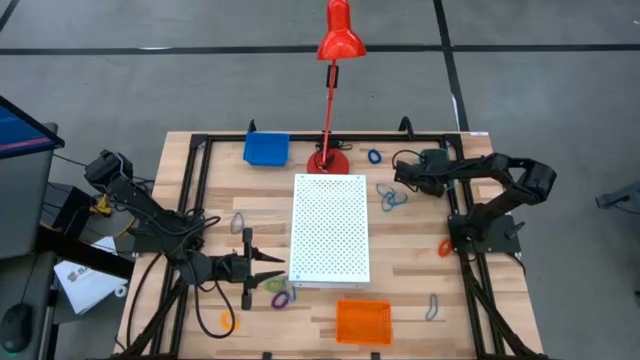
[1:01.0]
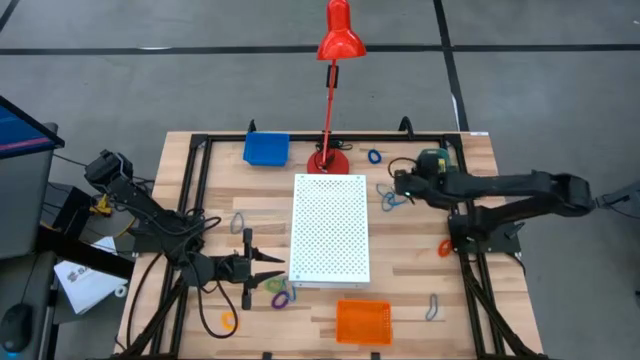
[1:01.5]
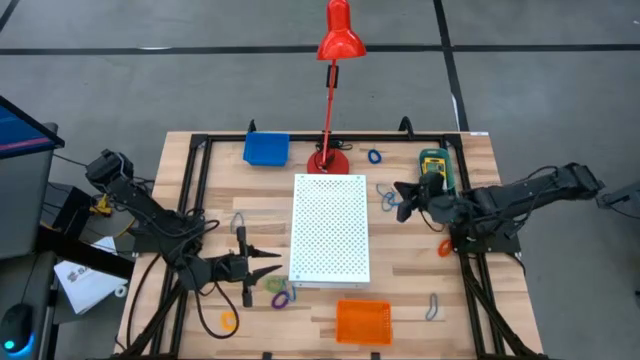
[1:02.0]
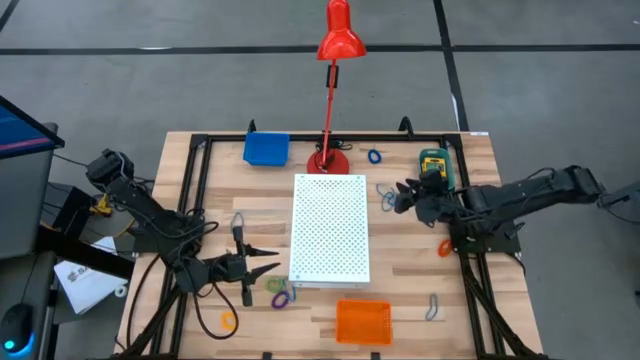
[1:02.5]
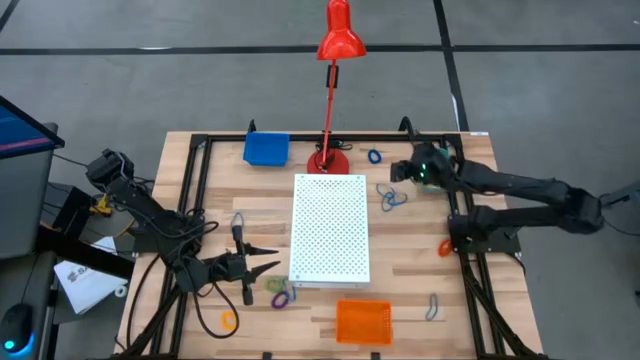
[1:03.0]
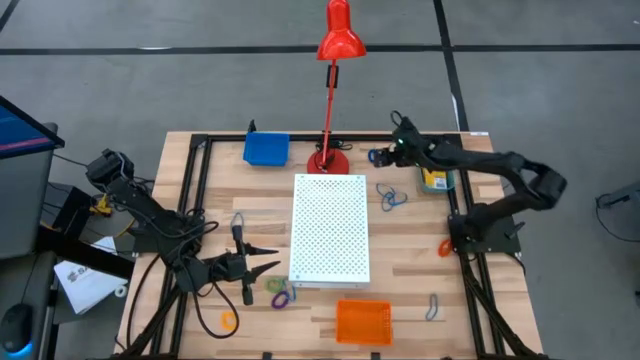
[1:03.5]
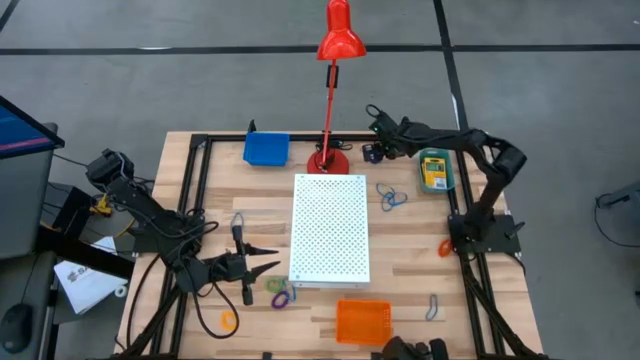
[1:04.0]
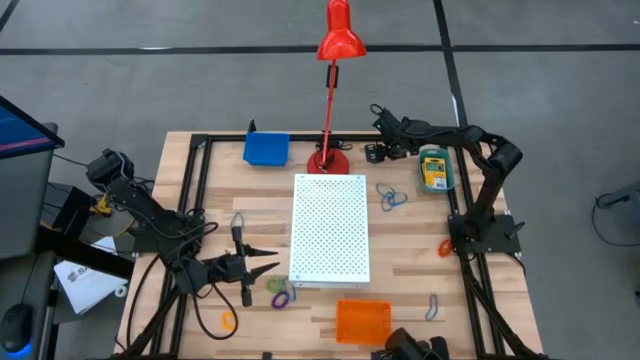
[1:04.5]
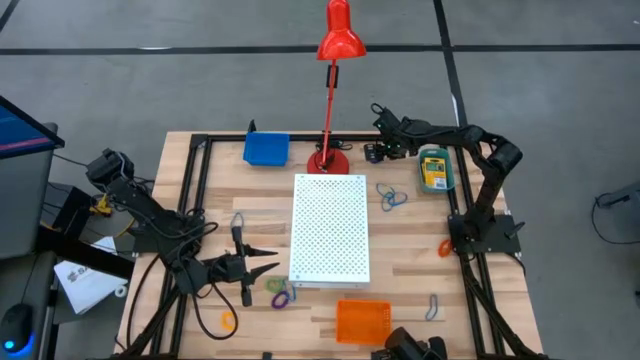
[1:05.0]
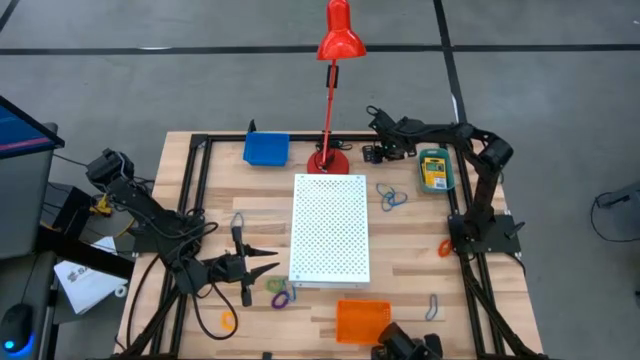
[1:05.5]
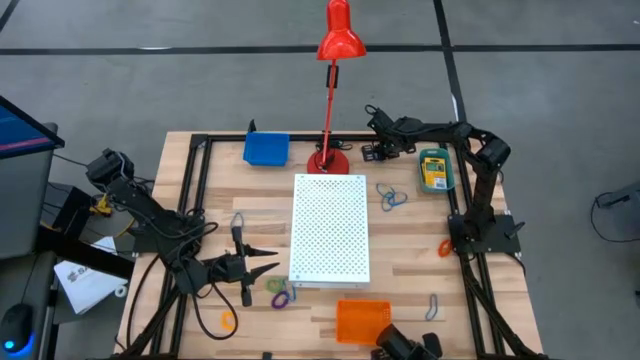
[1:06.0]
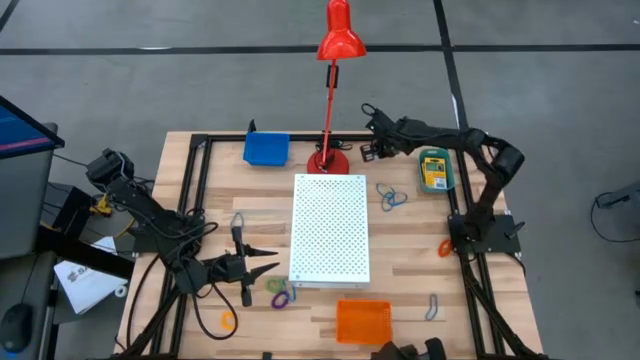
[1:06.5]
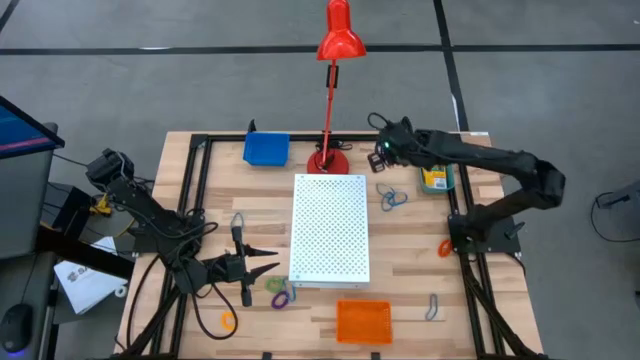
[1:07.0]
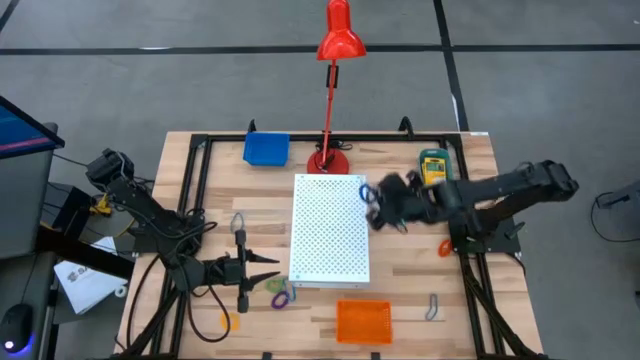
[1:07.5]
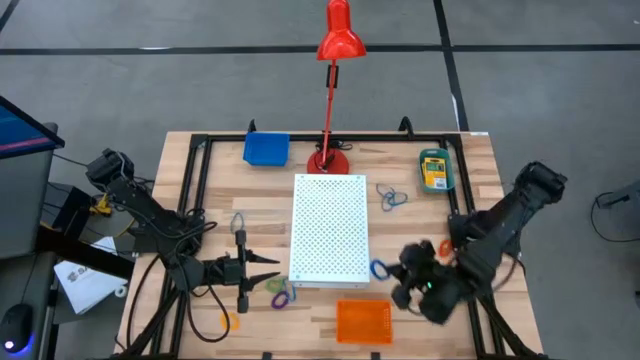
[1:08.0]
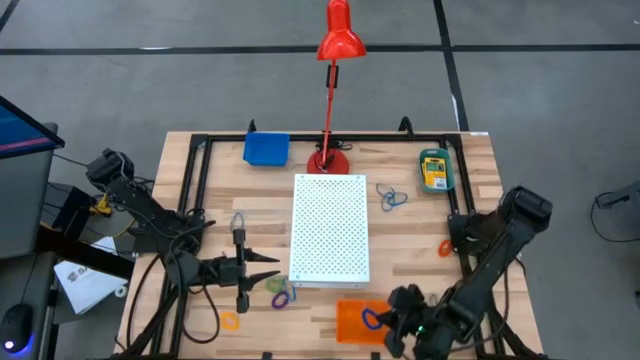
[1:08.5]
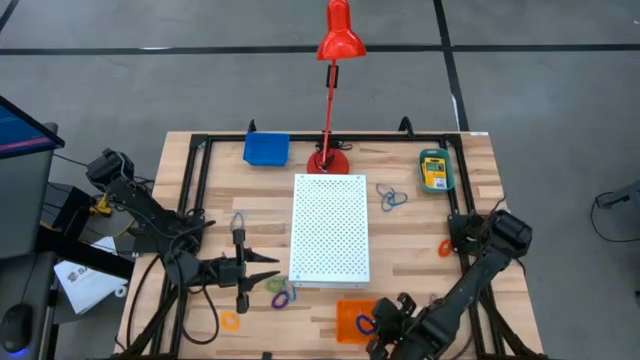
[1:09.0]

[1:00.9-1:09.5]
Task: Pick & Place Office Desk Supplies
Put the blue spring keychain into the orange bin

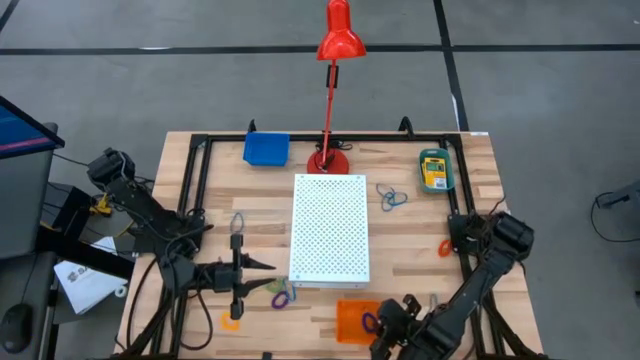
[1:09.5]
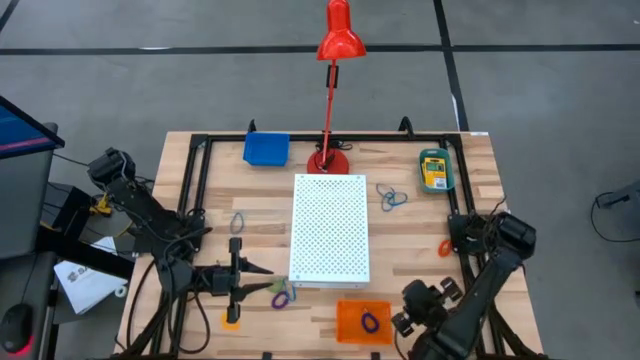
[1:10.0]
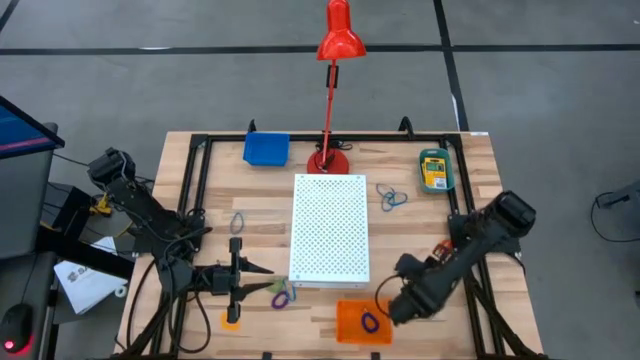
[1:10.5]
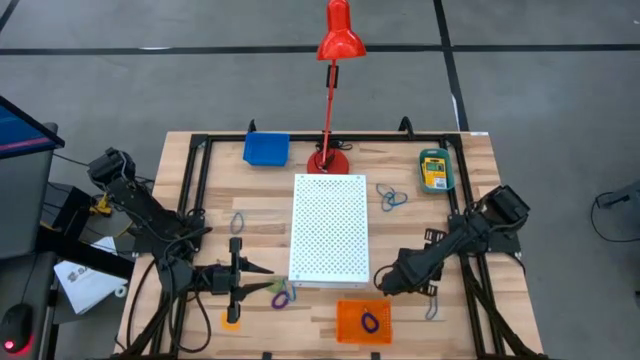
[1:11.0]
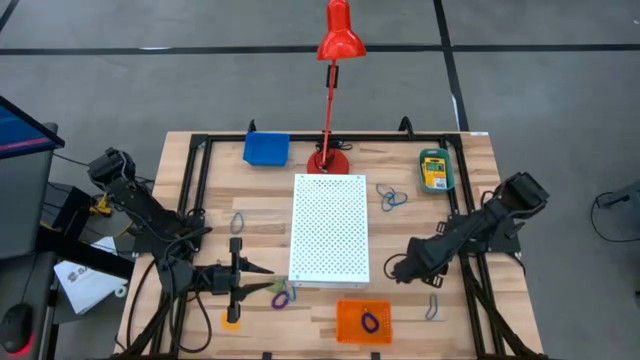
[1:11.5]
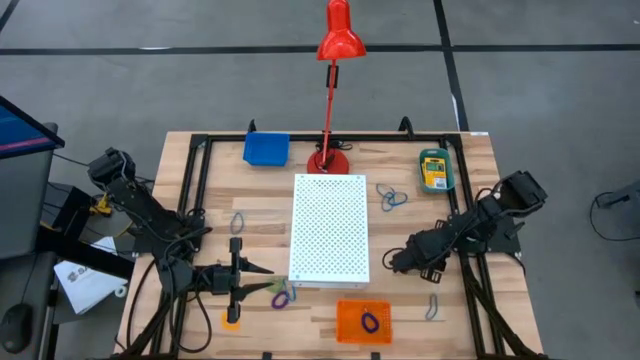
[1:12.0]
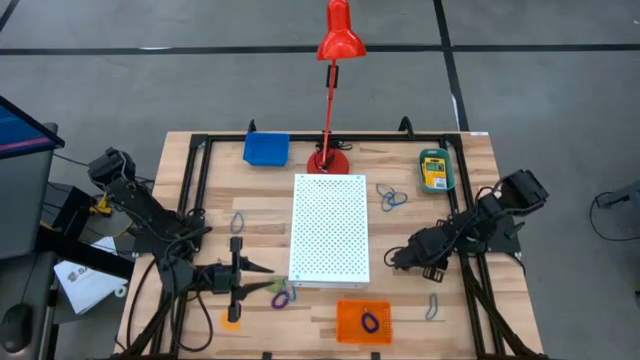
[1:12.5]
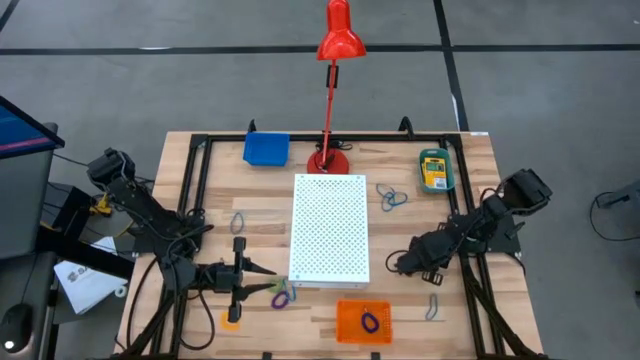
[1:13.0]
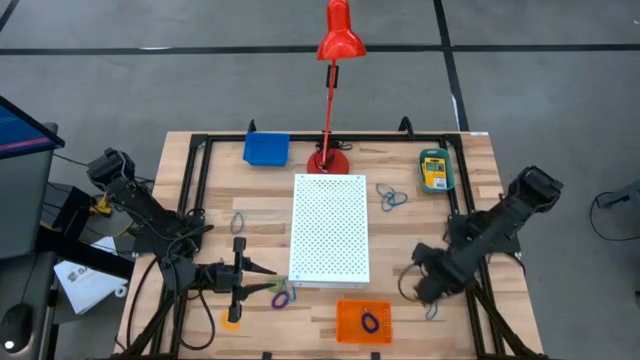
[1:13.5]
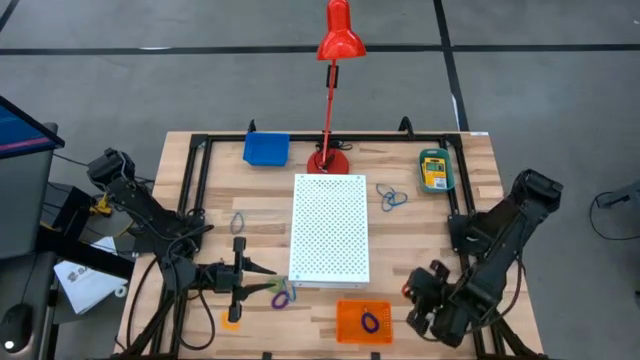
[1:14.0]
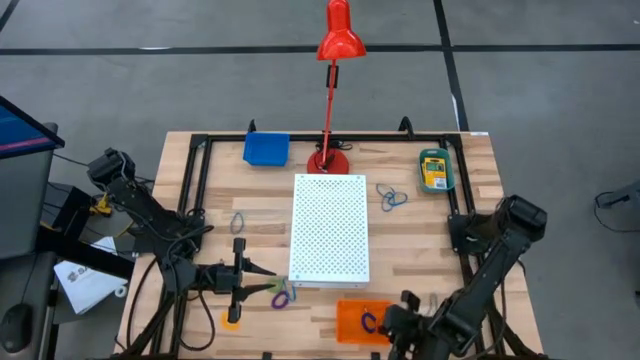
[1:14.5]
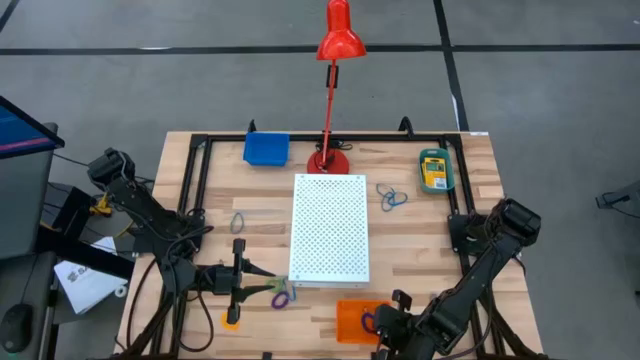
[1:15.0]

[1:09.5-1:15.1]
Put the orange spring keychain into the orange bin

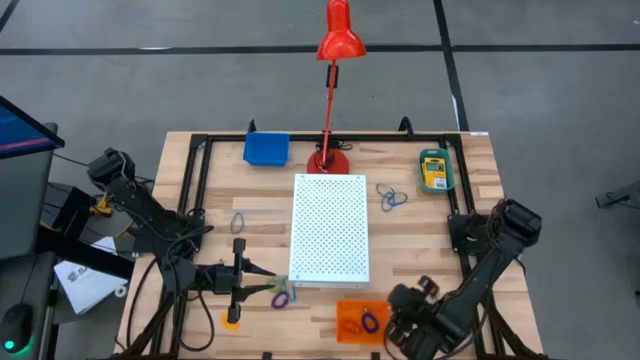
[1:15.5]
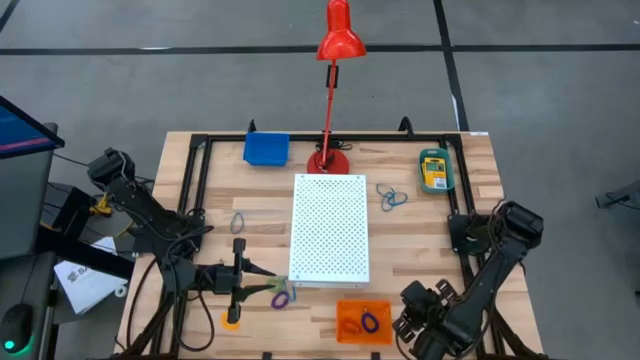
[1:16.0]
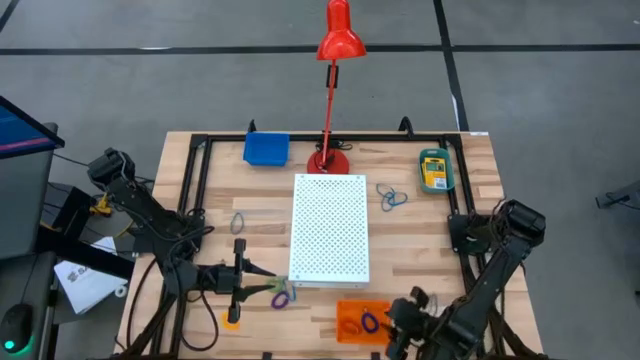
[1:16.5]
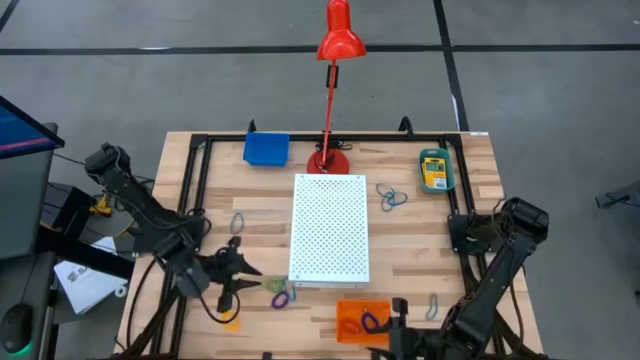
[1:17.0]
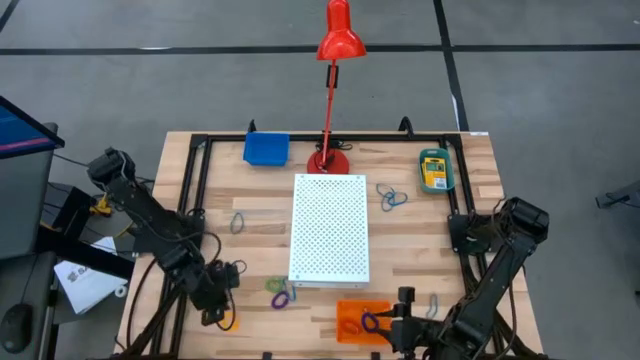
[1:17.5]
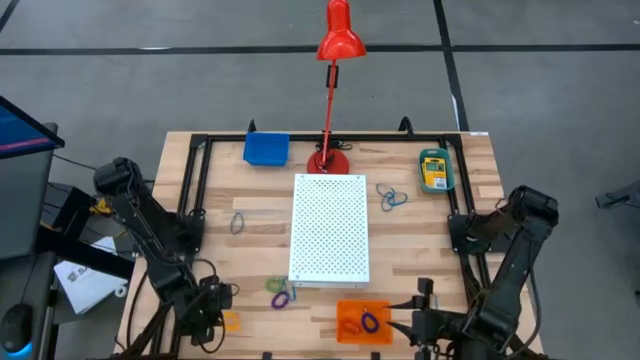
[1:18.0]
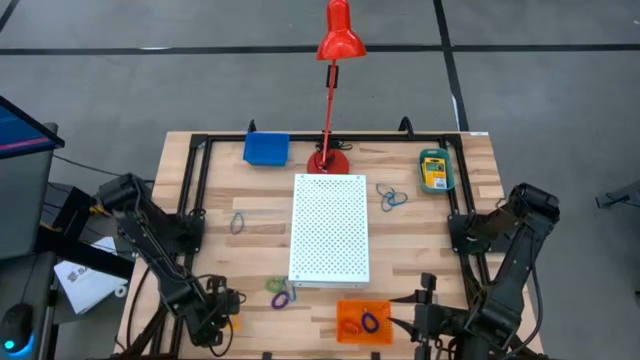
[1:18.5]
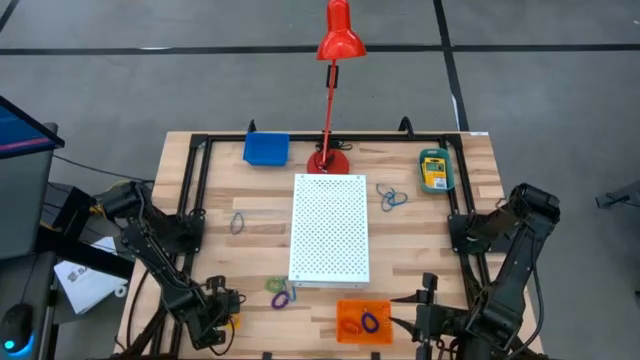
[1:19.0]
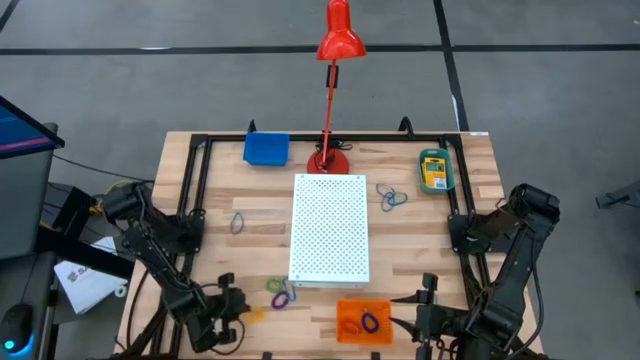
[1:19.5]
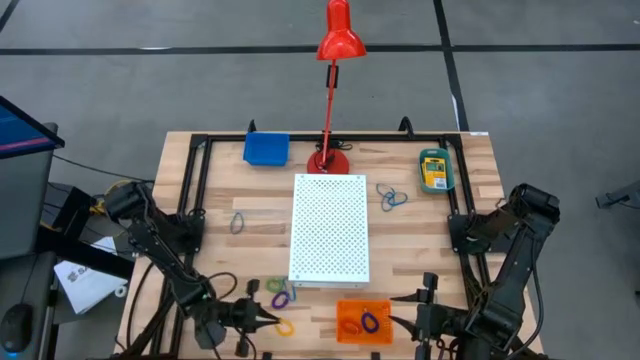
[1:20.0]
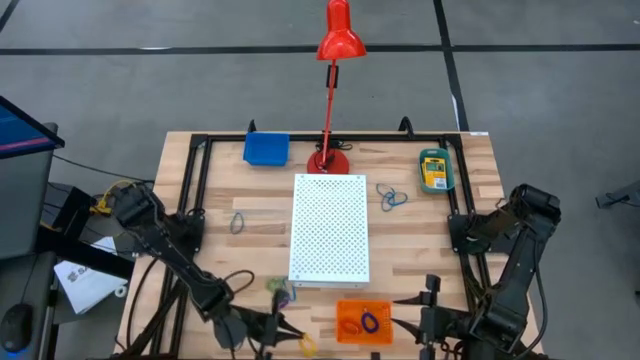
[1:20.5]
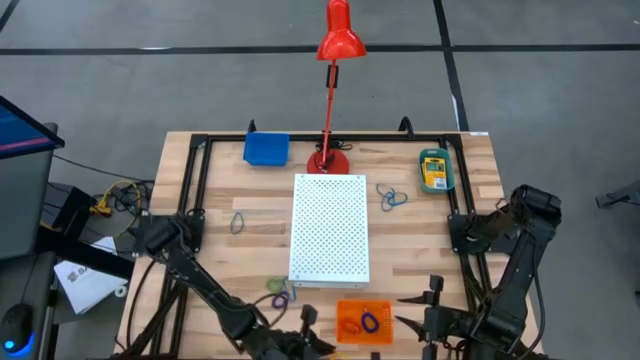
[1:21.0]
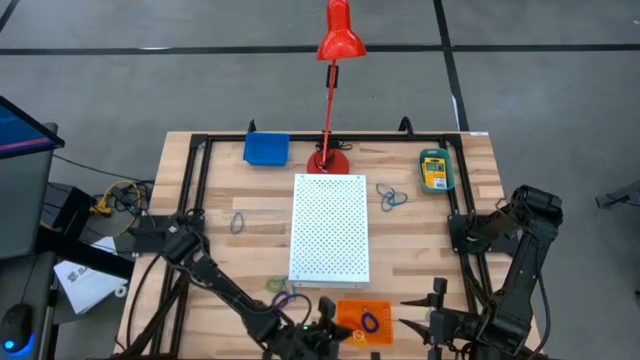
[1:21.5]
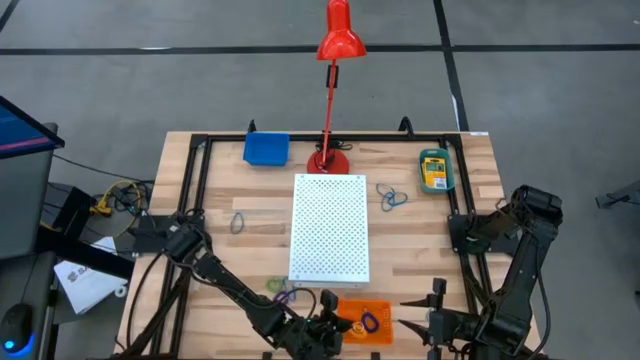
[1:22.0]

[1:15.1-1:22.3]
Put the yellow spring keychain into the orange bin

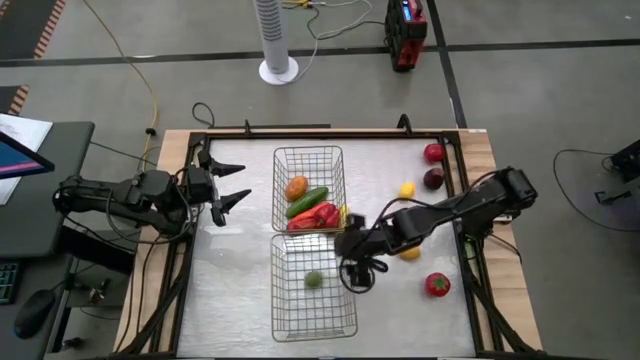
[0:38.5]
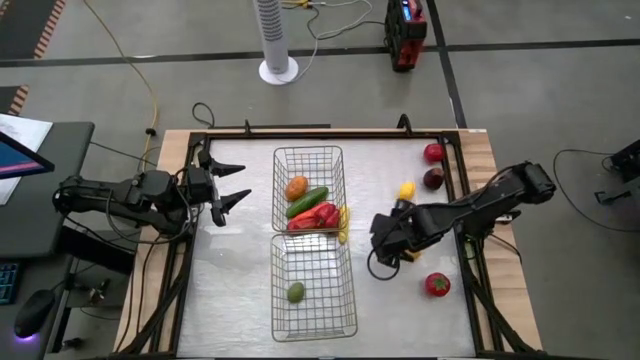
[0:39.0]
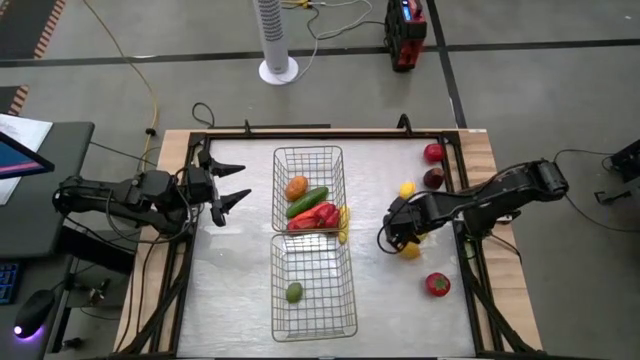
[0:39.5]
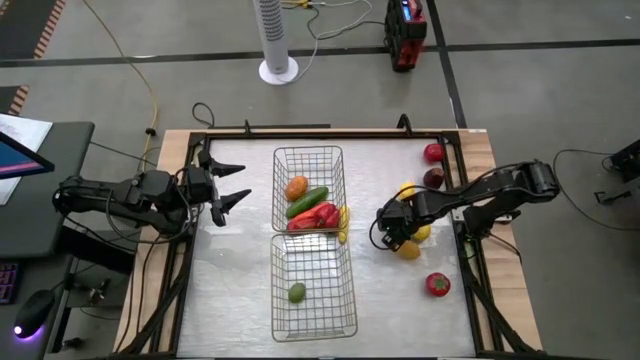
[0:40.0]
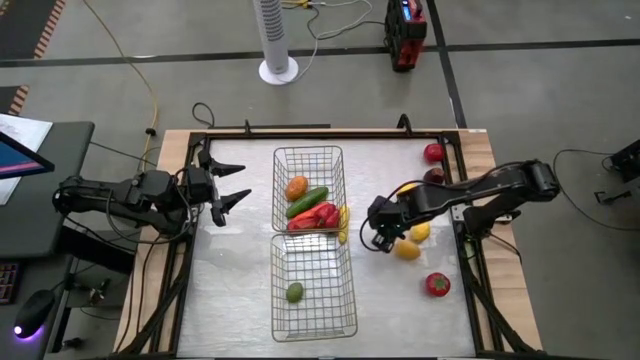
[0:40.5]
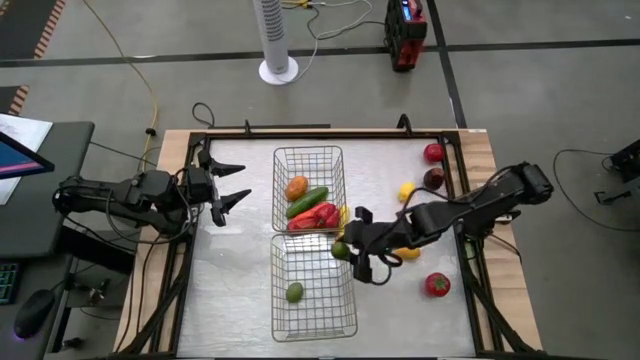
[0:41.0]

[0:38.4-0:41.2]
Task: Sort produce into baskets
Put the lime into the bottom wire basket
